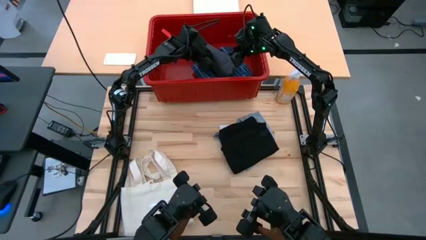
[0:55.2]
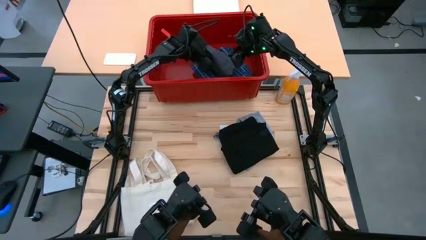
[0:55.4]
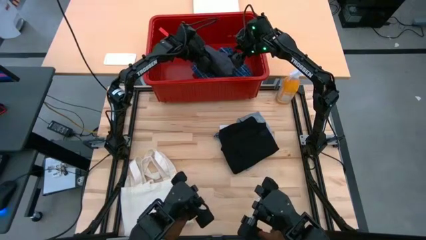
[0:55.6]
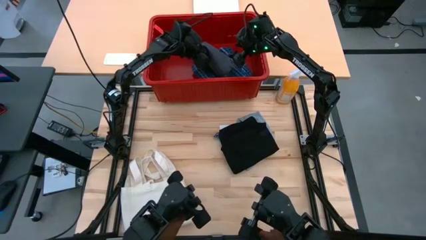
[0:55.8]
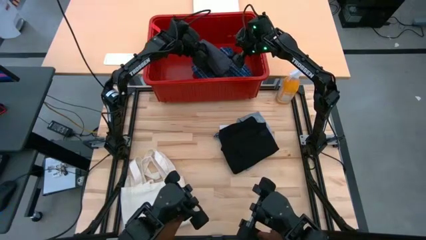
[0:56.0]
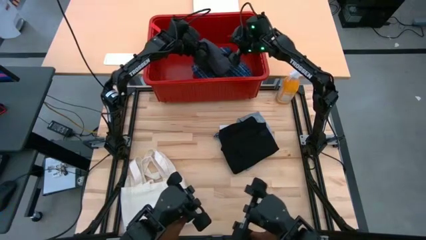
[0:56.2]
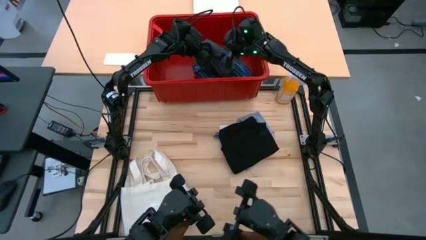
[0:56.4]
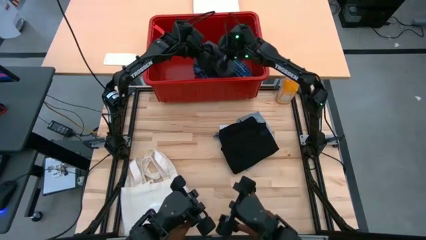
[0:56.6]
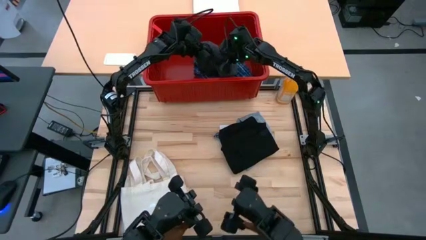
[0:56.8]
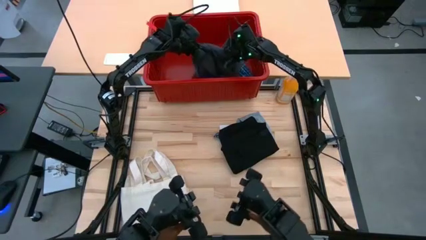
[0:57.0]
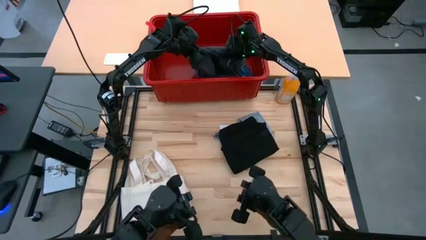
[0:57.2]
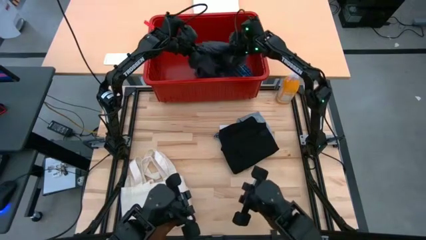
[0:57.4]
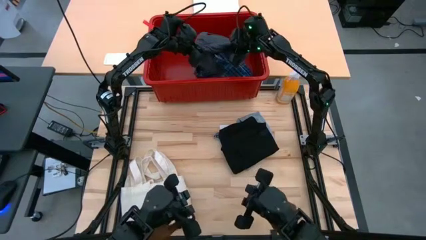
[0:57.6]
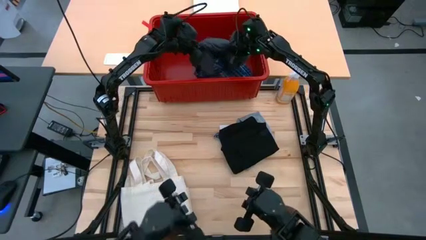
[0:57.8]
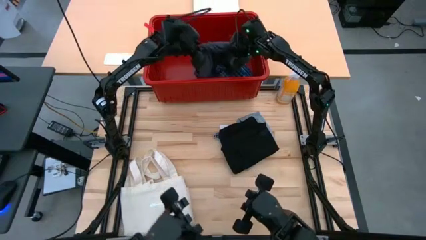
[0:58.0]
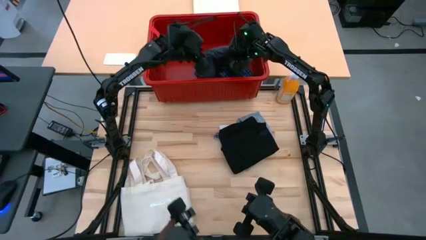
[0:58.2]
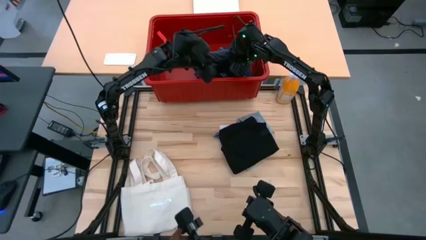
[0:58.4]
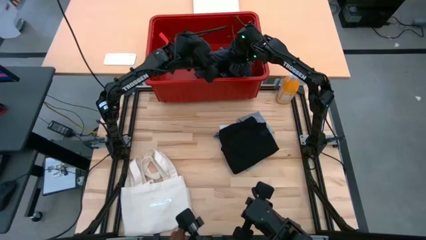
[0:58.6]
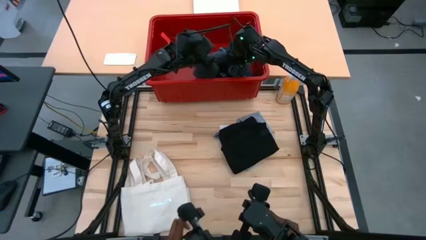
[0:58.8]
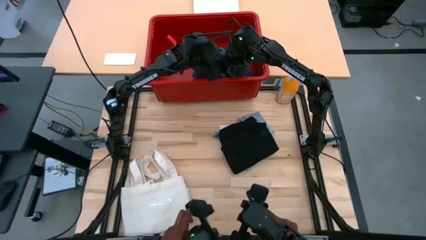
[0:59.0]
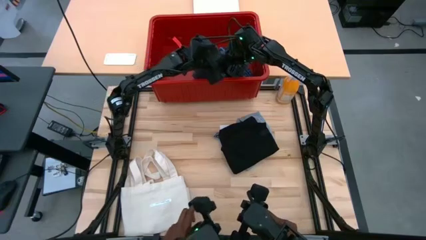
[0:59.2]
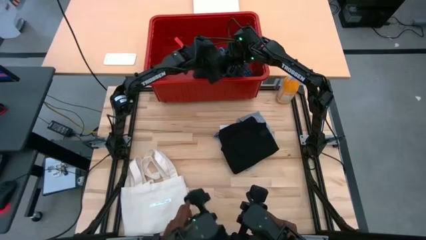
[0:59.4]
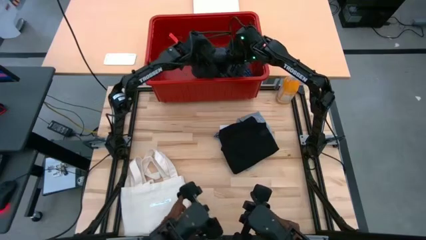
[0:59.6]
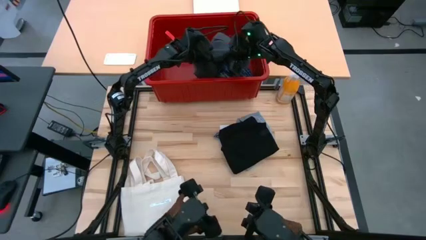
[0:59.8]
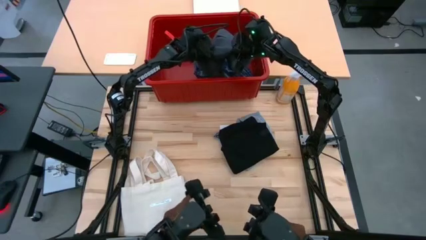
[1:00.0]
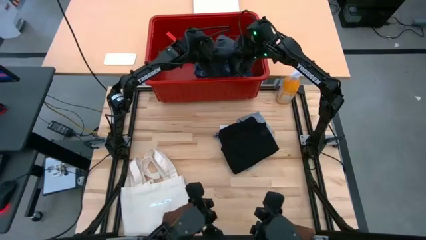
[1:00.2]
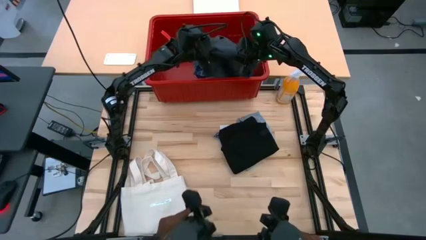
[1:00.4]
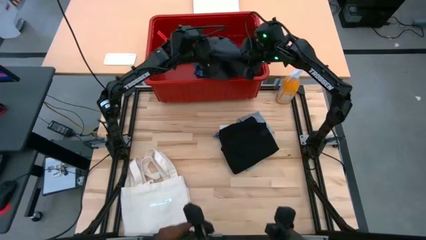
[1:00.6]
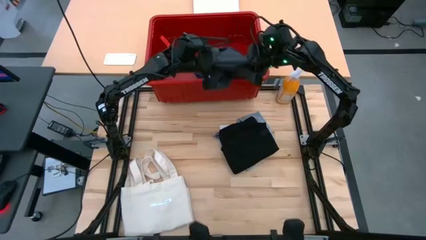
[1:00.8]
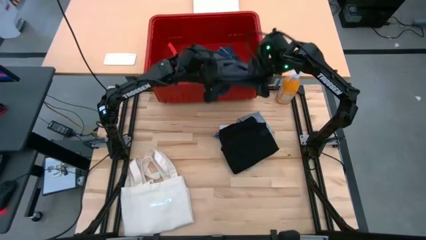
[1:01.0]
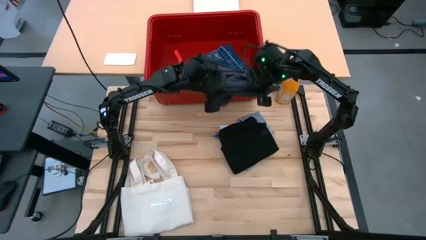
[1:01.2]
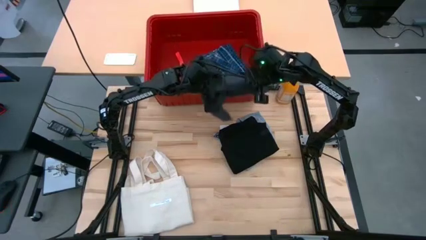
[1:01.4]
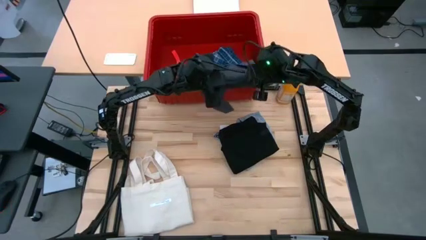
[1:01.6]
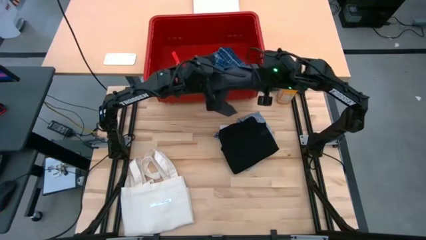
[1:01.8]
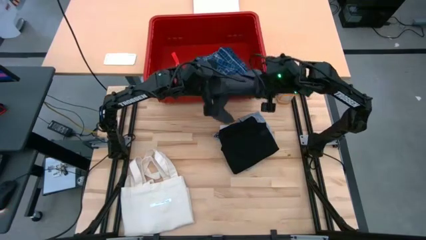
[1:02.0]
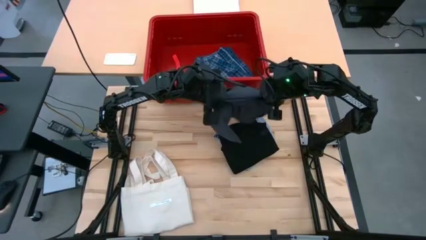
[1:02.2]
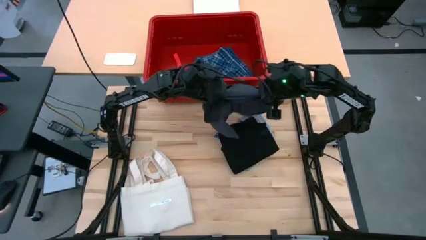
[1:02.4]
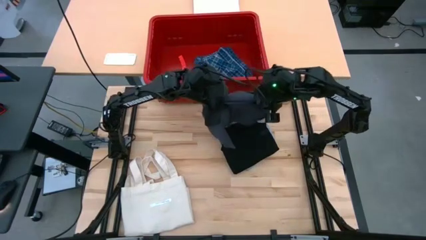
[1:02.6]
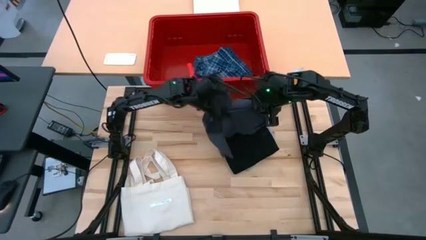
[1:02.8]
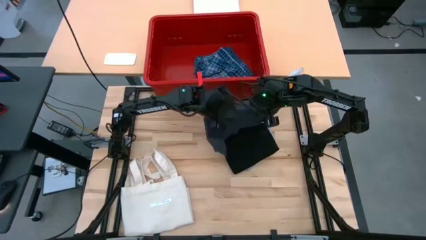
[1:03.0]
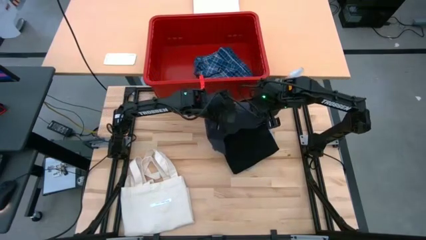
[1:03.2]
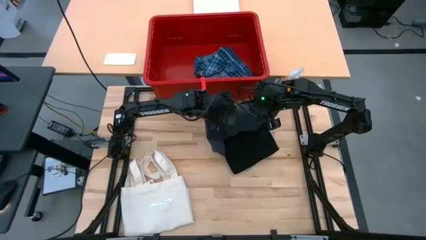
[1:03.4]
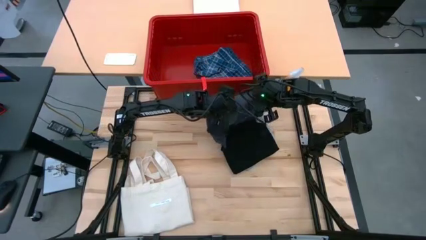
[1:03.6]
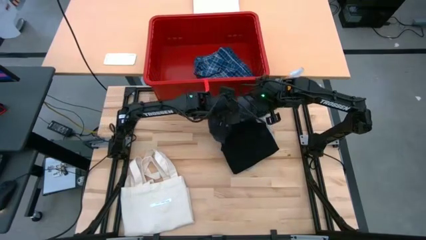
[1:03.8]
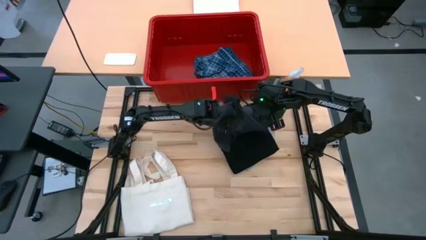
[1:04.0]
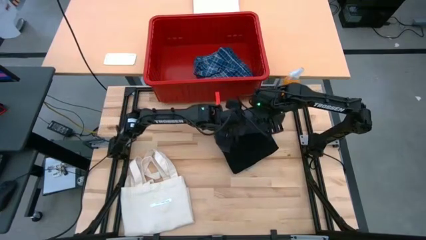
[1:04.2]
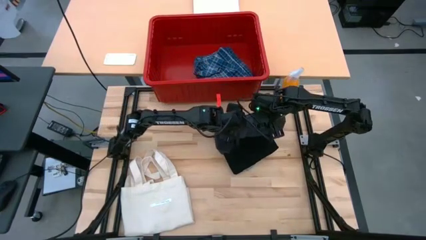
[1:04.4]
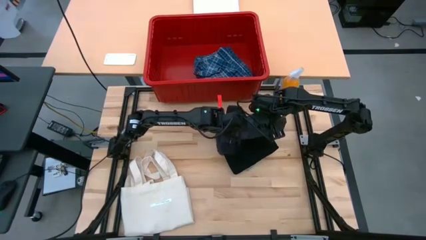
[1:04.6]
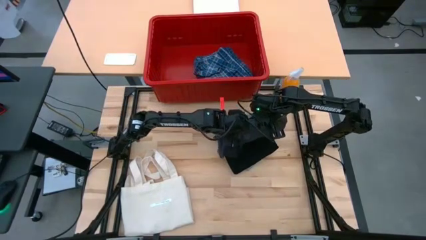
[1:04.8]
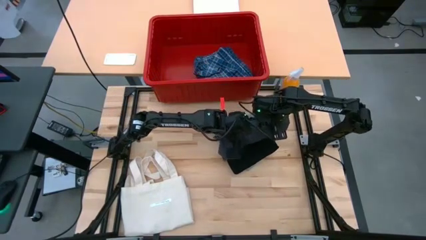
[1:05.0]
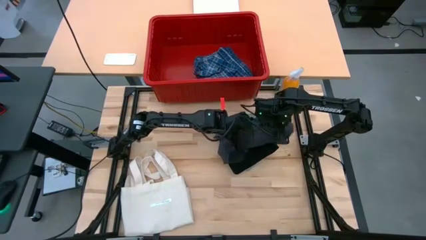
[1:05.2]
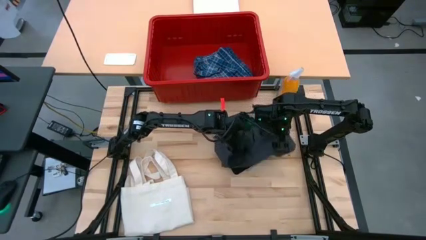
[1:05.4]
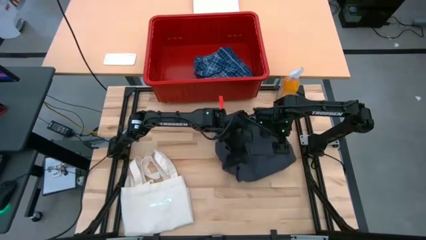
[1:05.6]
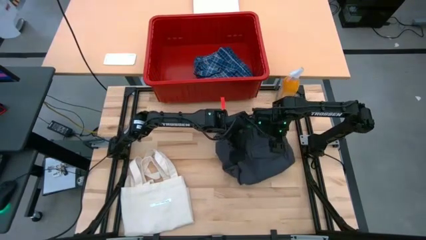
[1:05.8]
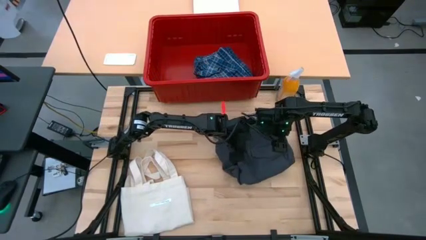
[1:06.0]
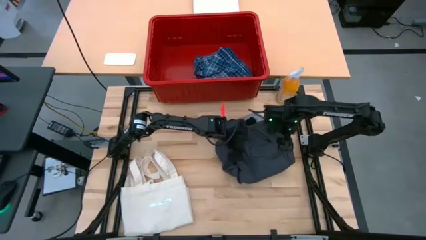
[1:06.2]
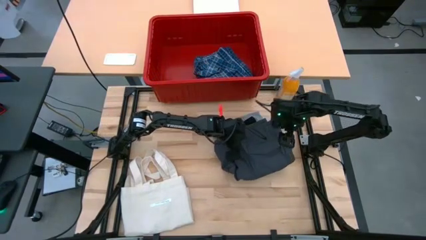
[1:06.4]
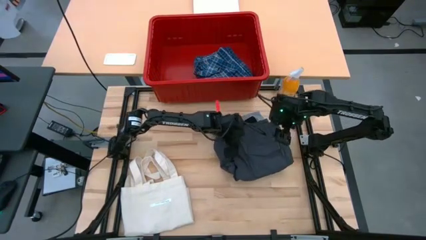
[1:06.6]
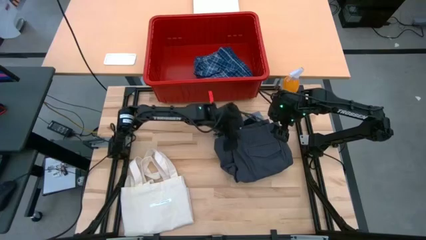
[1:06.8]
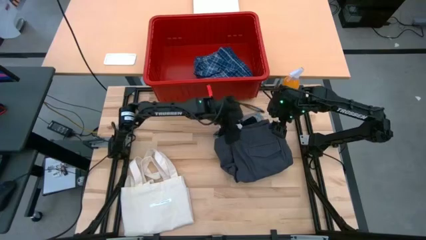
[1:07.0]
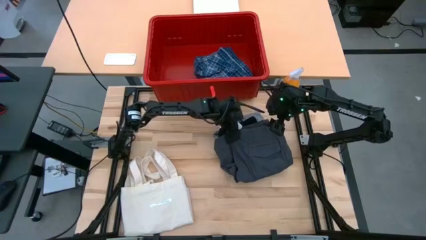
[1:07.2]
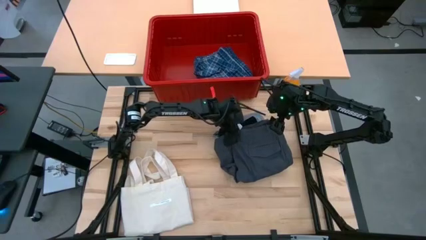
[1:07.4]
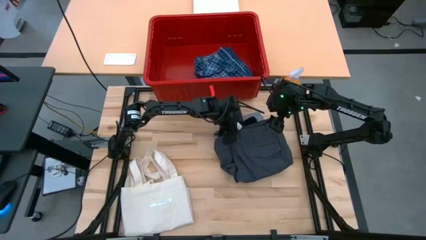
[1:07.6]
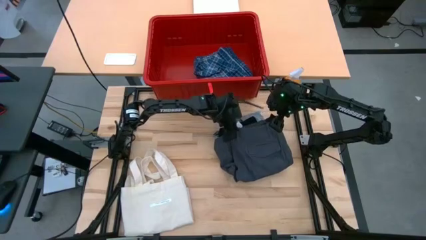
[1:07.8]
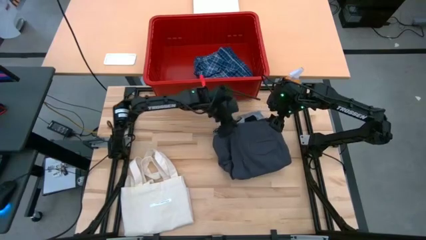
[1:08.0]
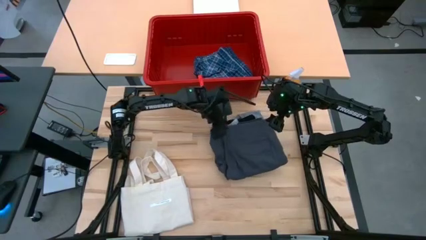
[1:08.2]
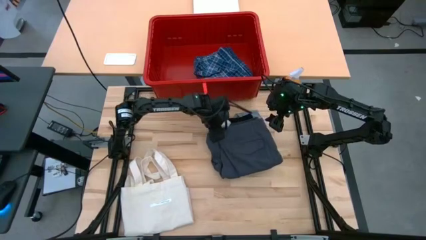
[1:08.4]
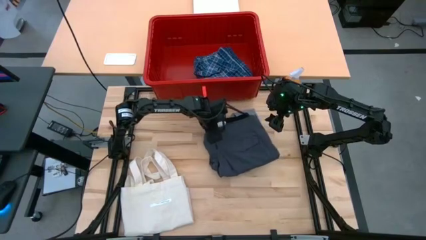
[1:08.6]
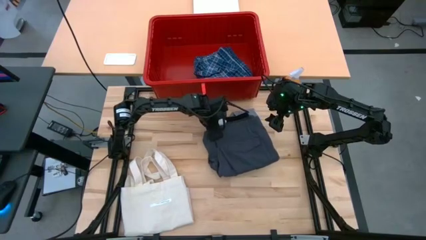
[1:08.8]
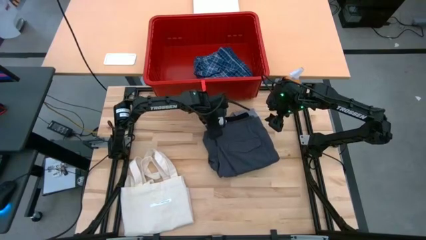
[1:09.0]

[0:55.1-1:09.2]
Task: Fold laundry
Remove the gray pants from the red organizer bin
